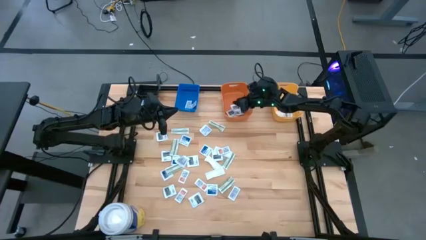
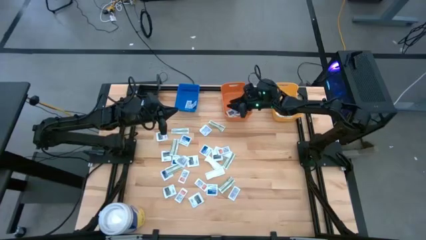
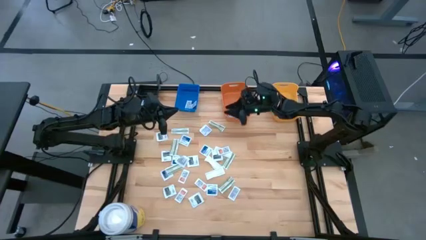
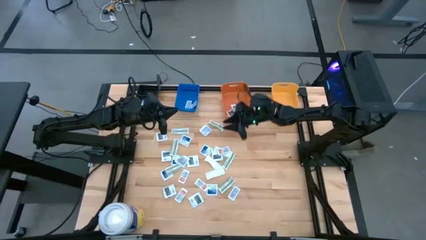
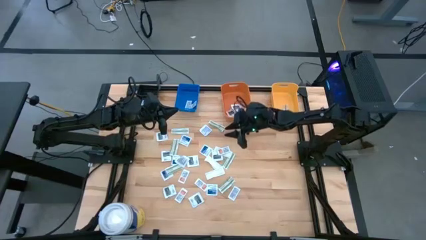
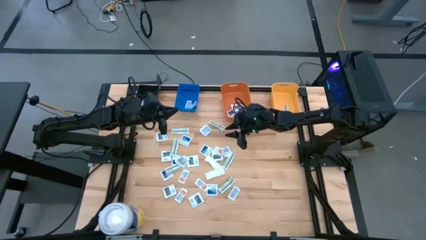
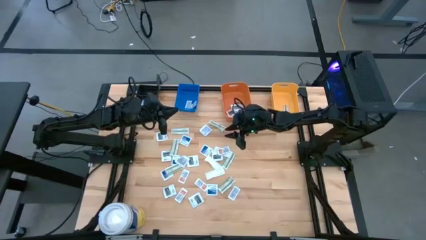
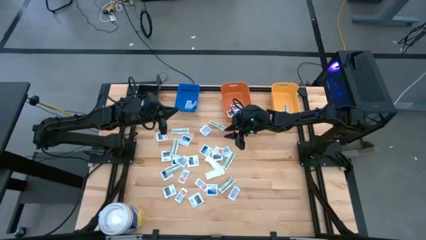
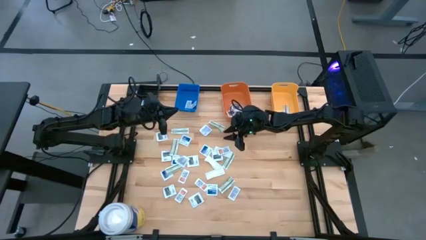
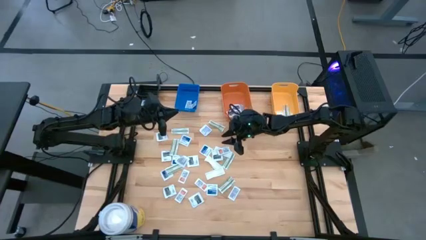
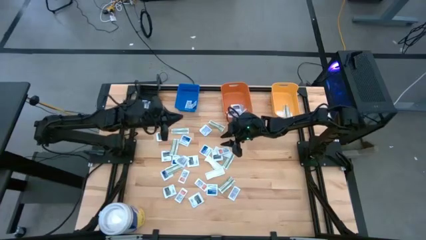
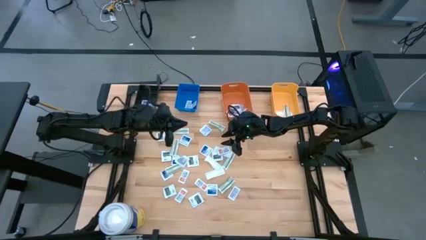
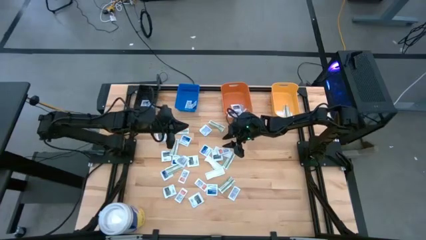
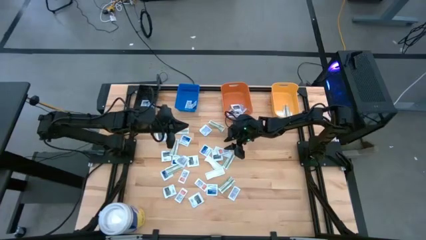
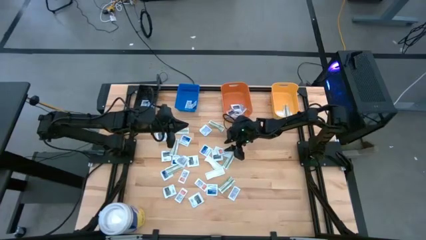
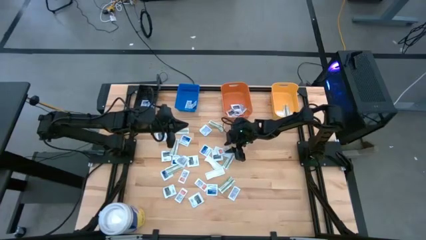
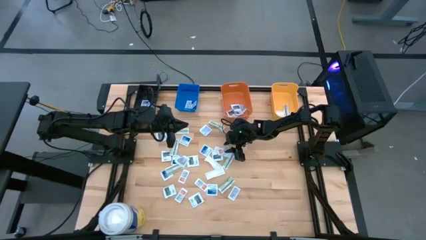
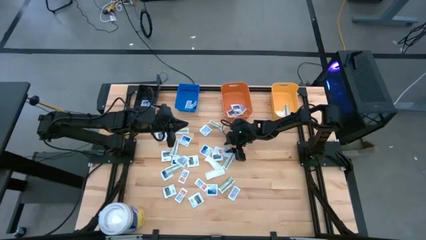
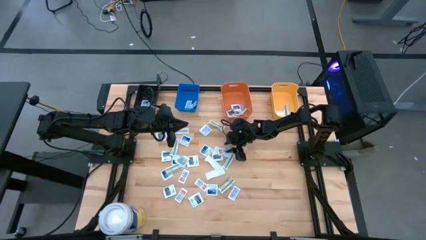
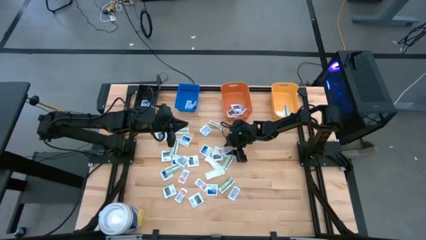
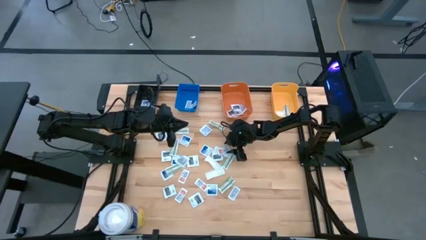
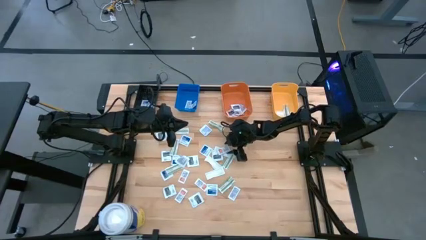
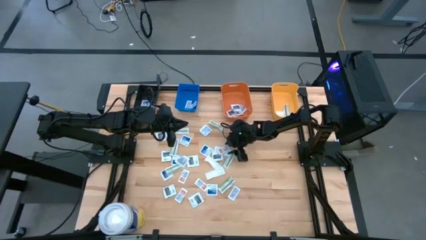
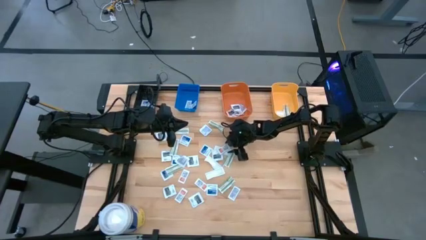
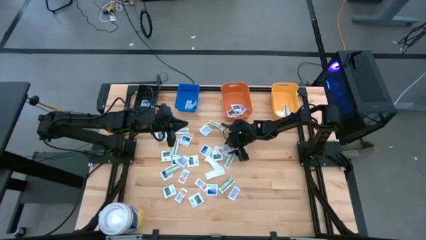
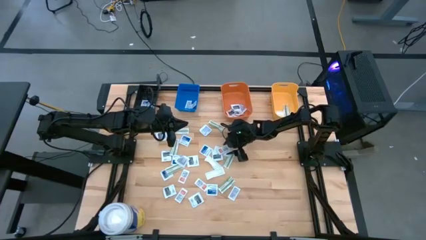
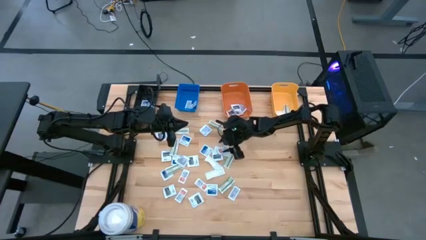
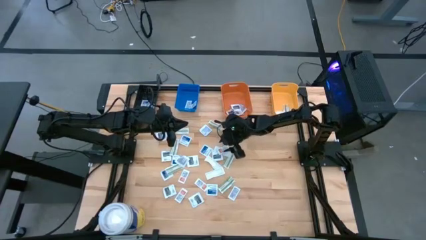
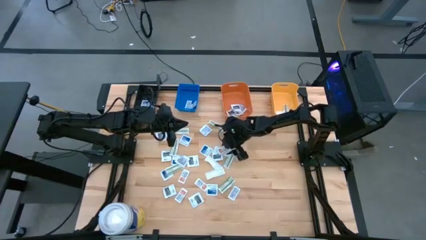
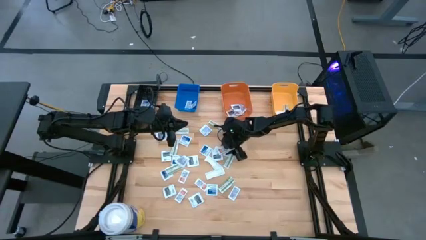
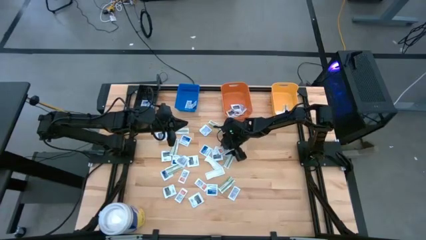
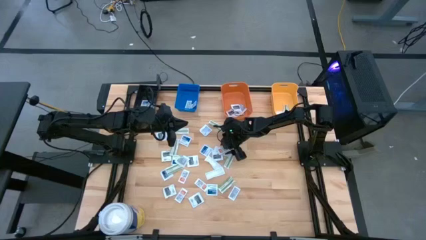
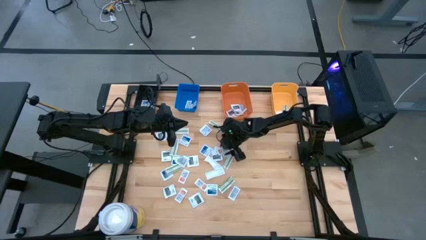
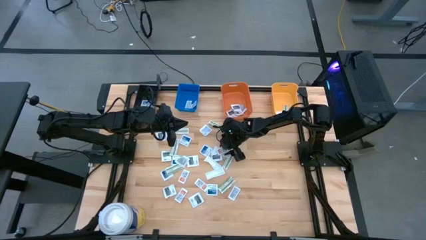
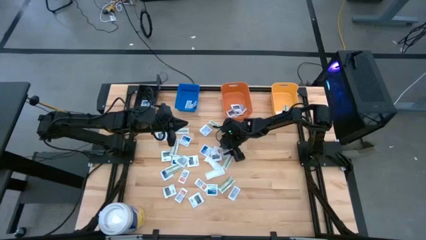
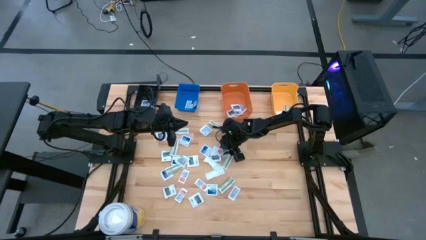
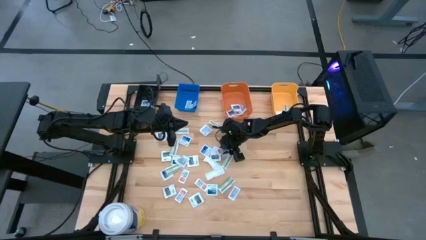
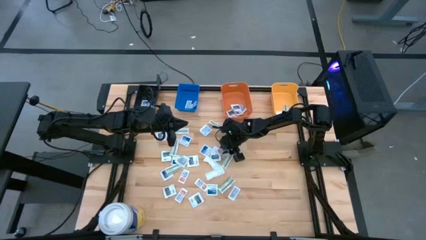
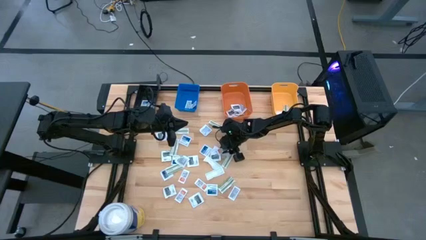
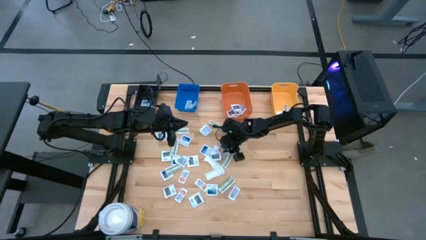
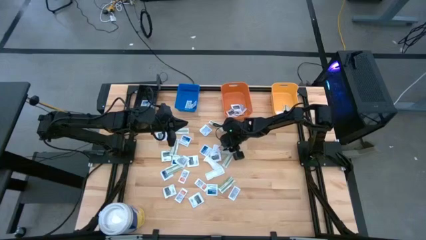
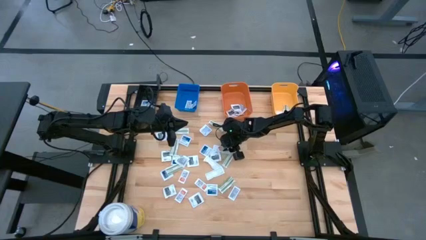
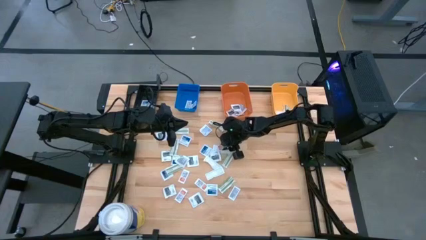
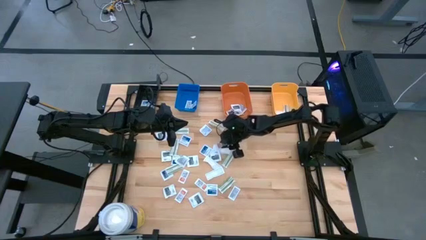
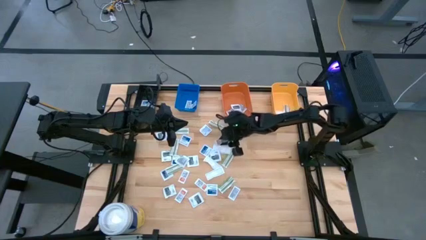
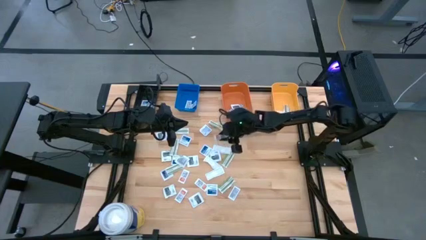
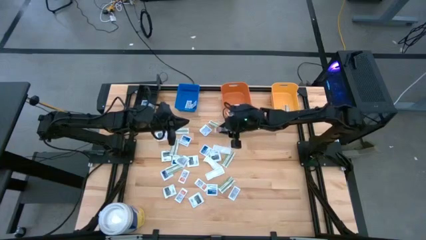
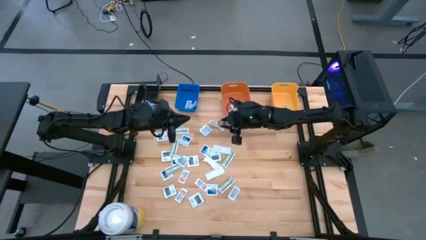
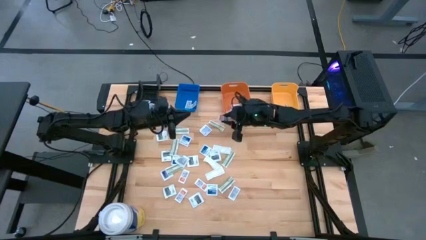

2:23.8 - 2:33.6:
Task: Pick & Place First Aid Supplies
Put the ointment pack into the blue bin

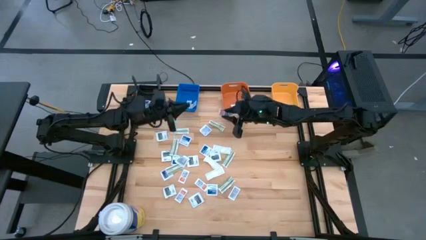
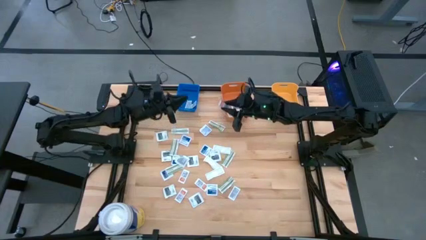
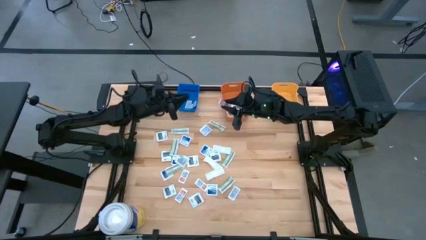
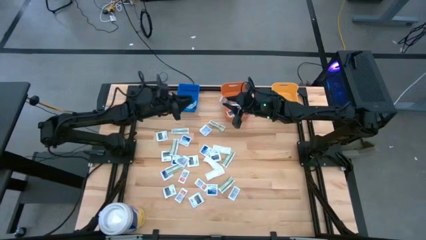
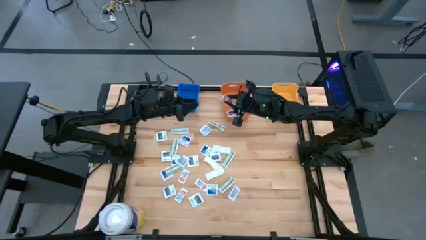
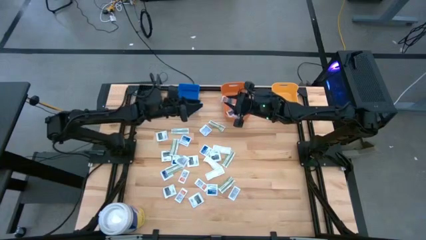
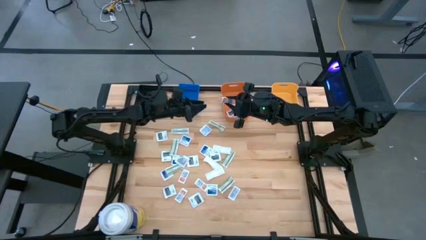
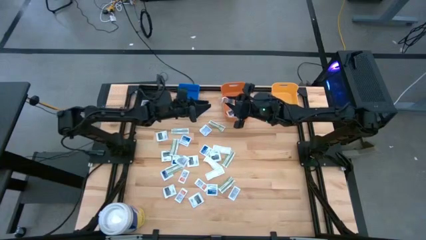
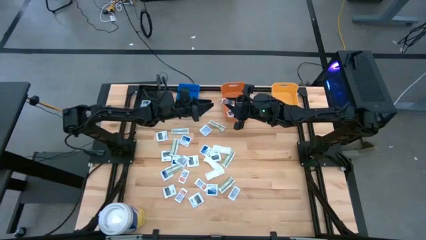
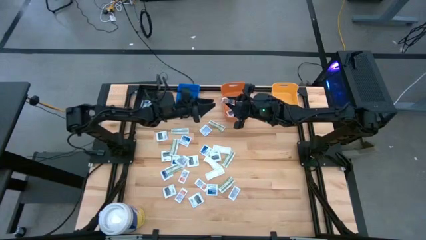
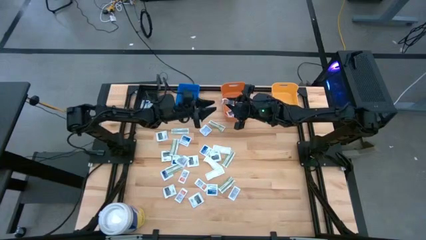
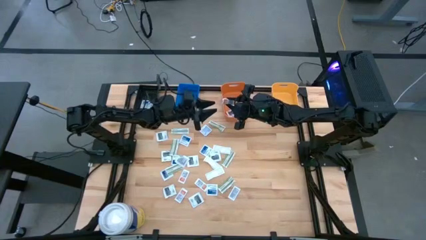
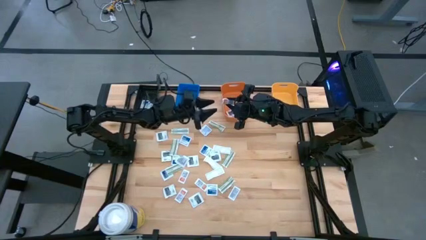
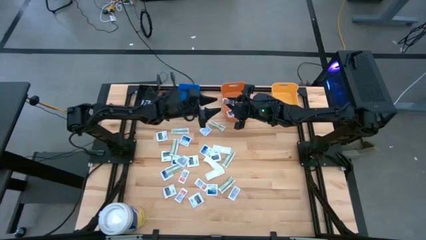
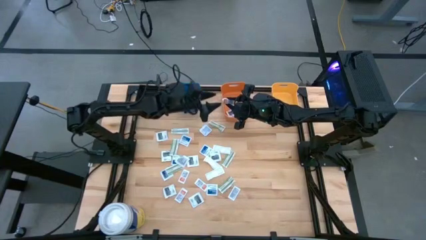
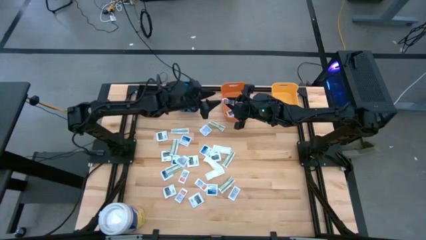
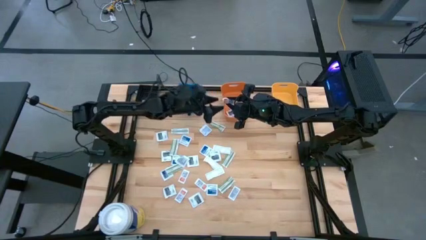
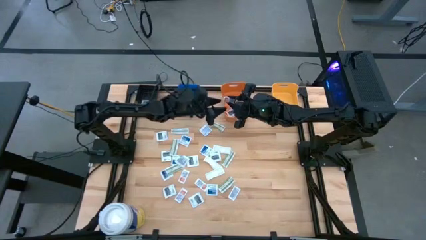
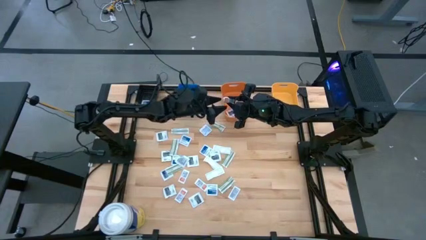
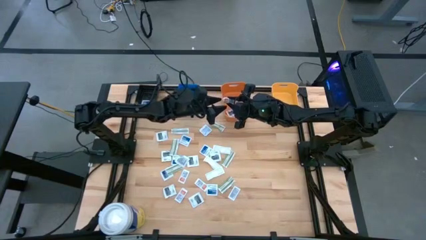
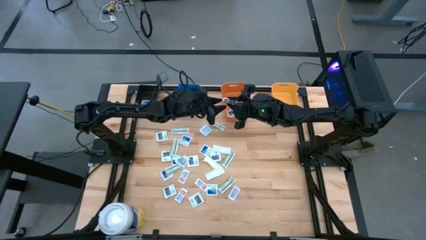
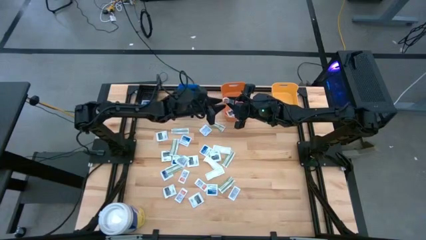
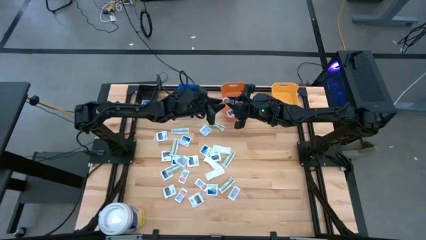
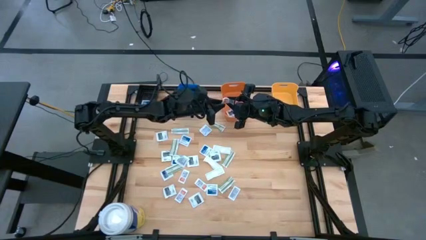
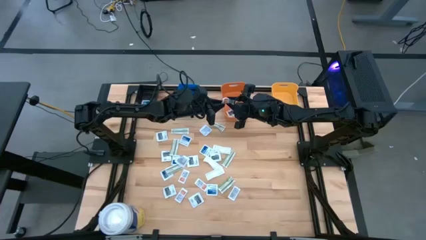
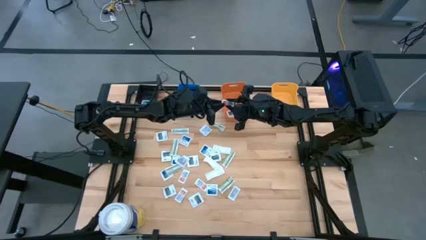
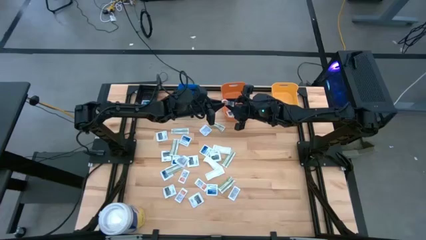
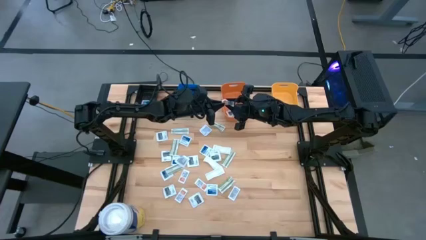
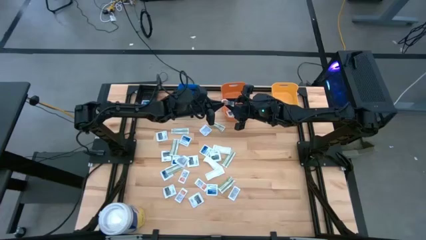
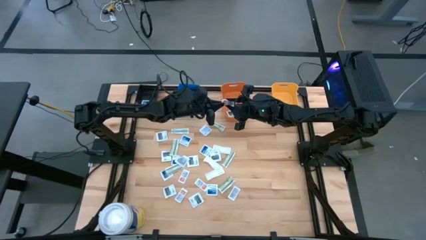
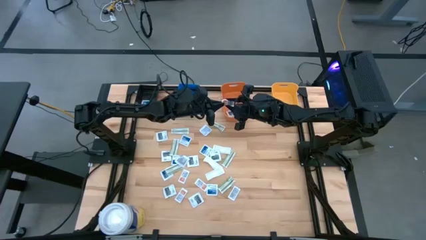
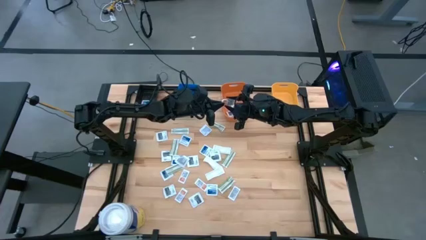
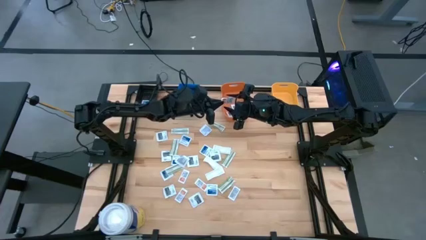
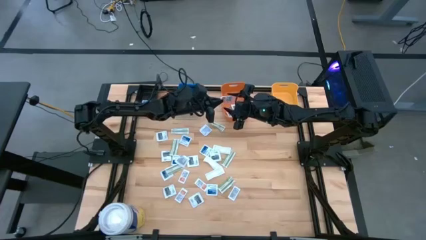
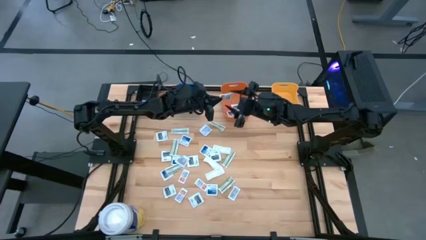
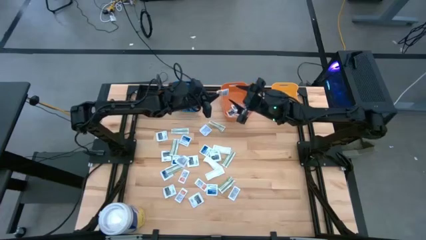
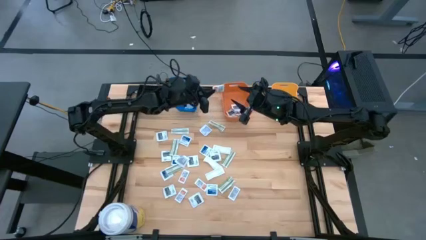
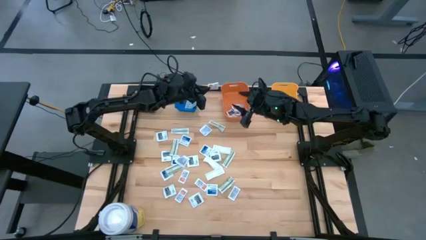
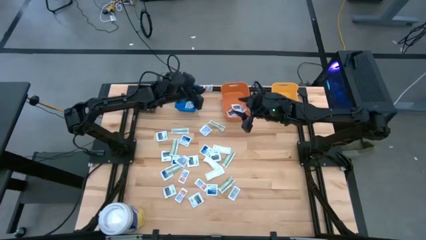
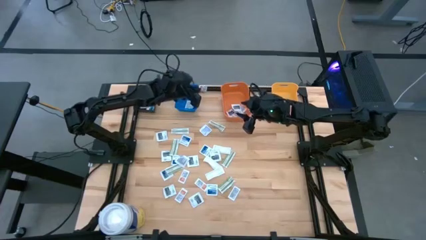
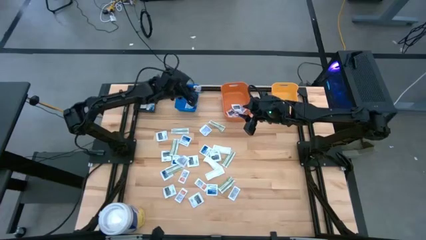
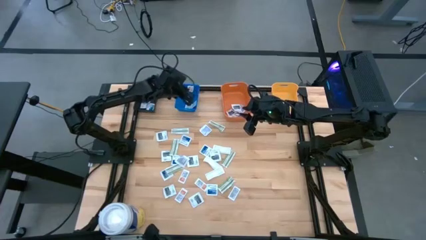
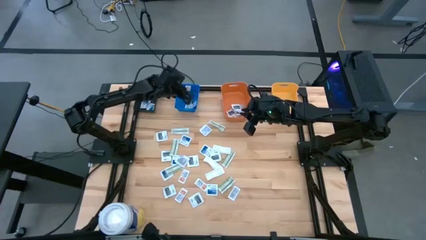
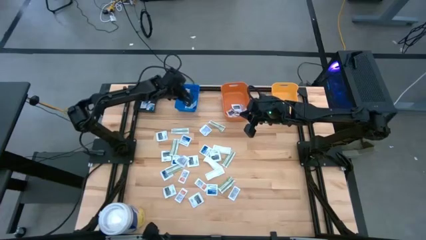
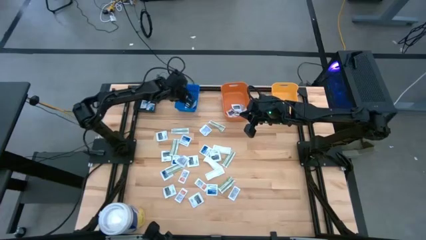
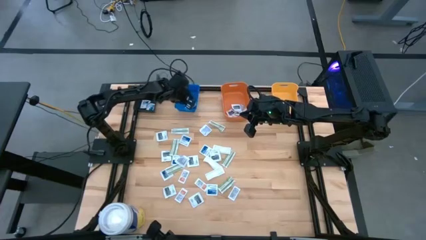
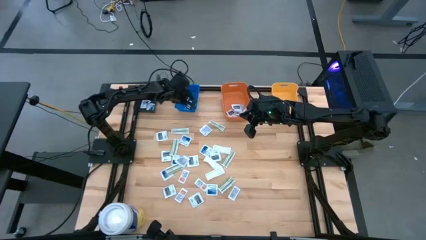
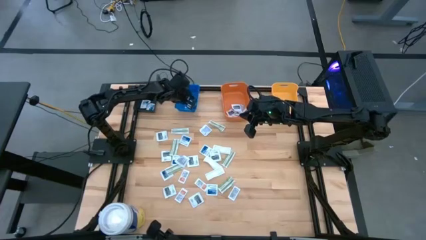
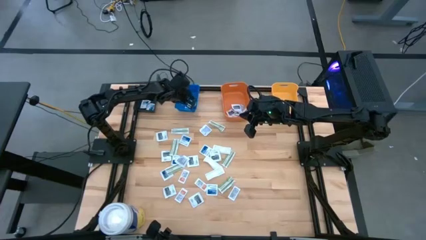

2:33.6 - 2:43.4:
Put the ointment pack into the blue bin
